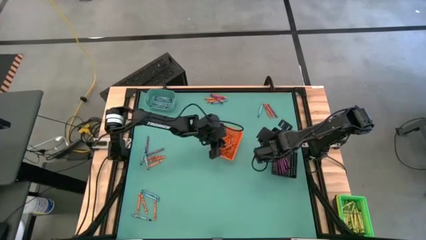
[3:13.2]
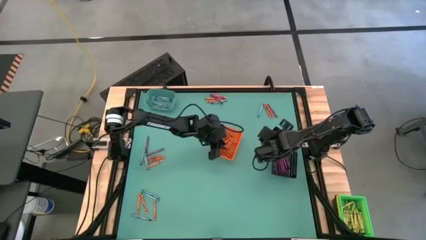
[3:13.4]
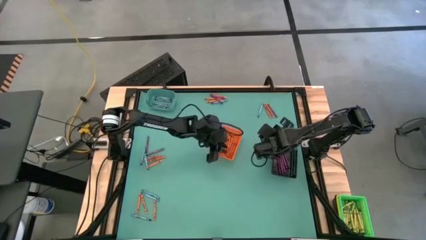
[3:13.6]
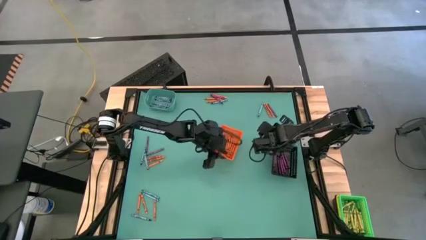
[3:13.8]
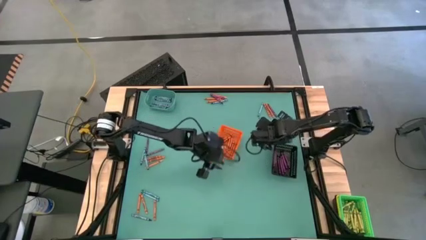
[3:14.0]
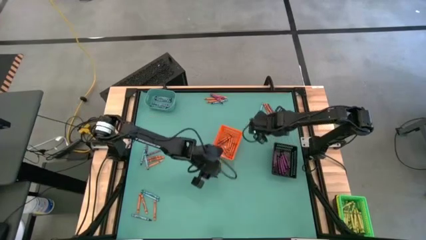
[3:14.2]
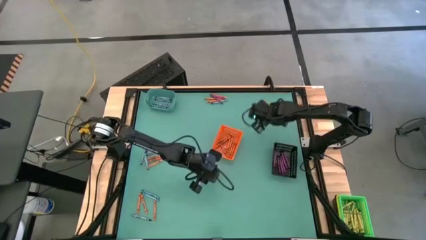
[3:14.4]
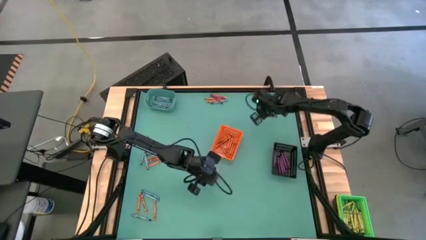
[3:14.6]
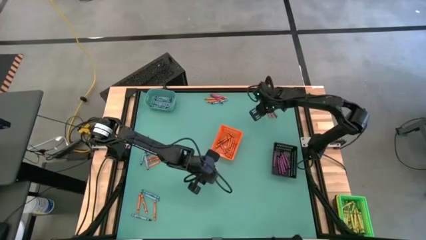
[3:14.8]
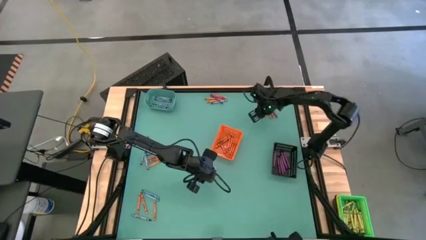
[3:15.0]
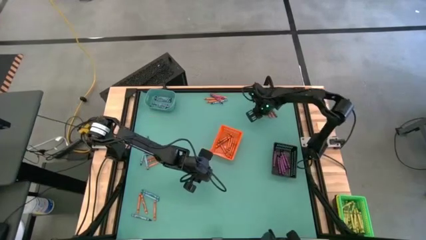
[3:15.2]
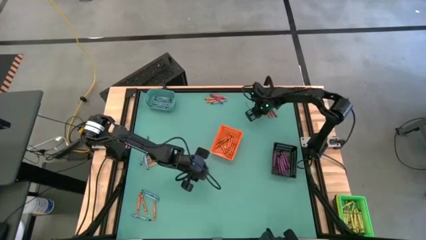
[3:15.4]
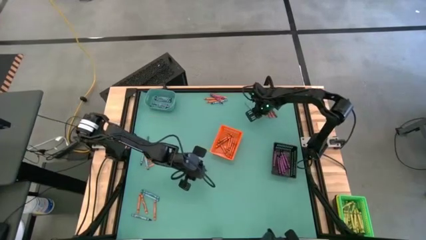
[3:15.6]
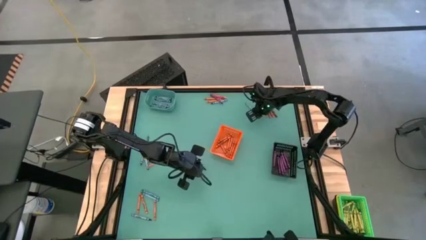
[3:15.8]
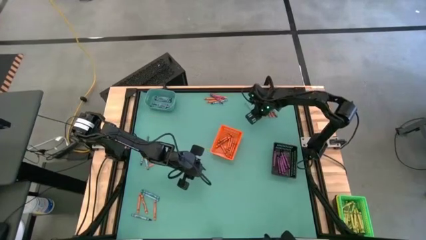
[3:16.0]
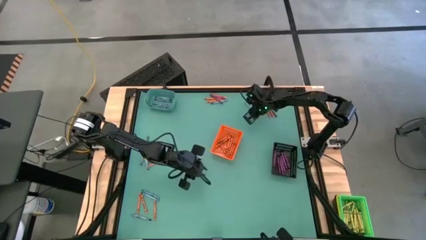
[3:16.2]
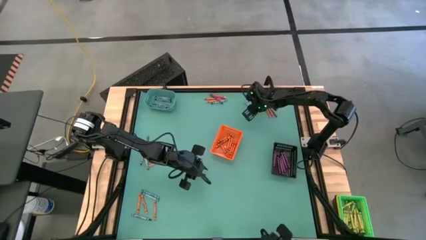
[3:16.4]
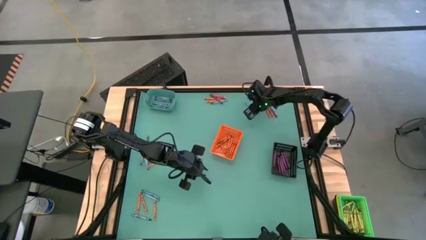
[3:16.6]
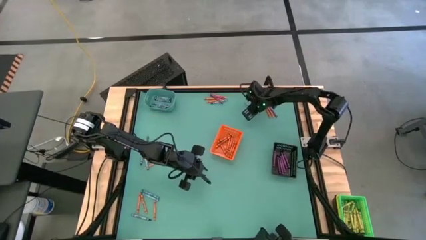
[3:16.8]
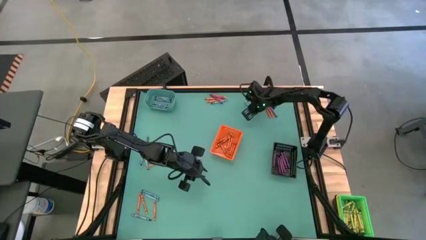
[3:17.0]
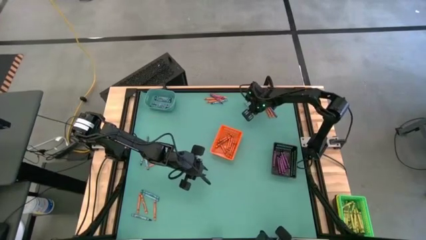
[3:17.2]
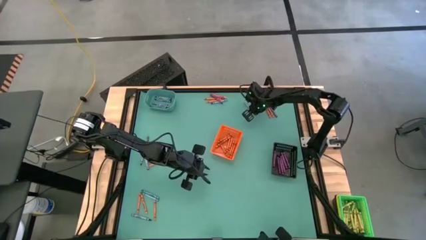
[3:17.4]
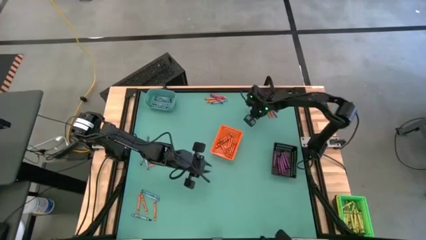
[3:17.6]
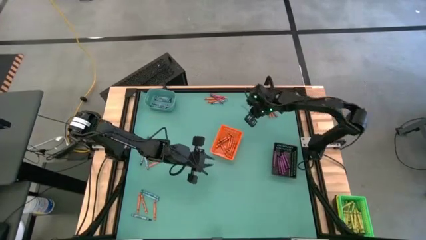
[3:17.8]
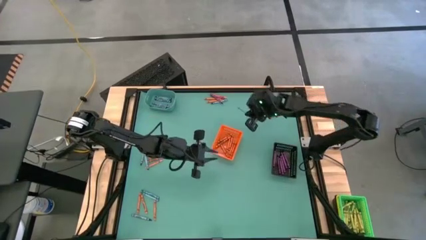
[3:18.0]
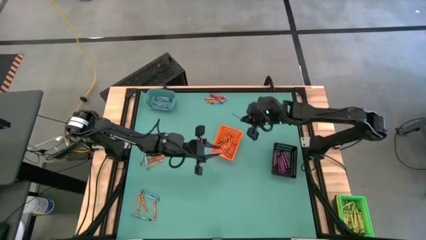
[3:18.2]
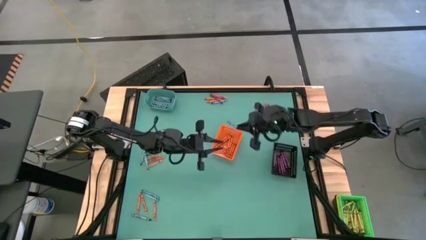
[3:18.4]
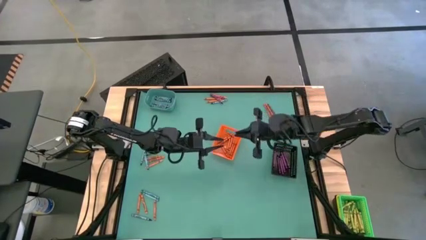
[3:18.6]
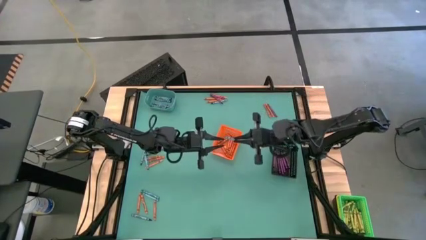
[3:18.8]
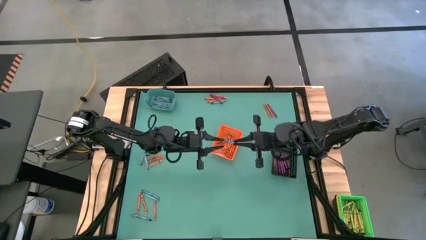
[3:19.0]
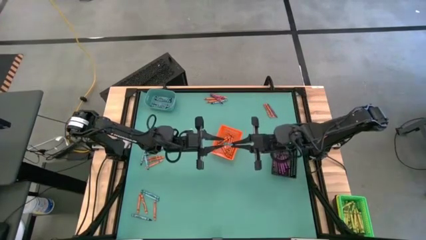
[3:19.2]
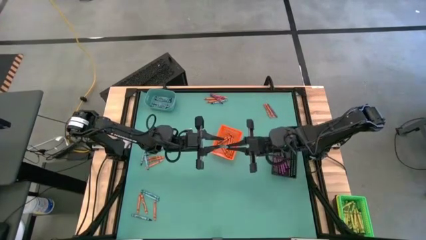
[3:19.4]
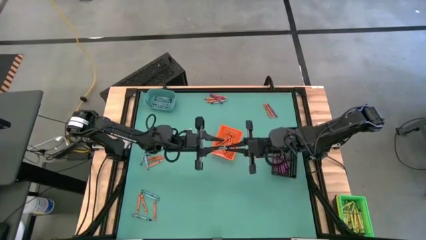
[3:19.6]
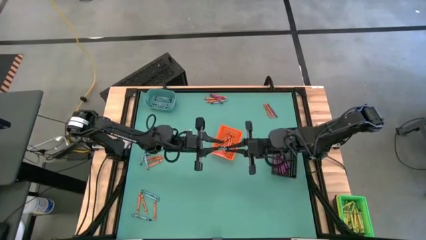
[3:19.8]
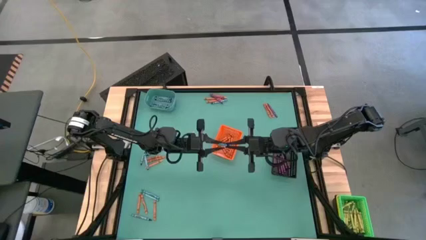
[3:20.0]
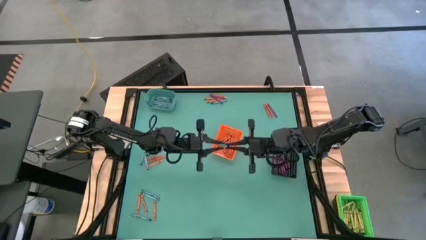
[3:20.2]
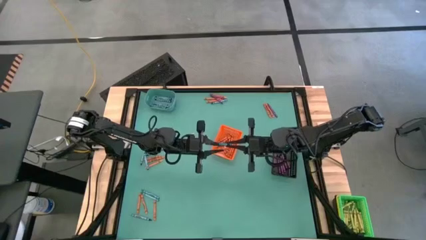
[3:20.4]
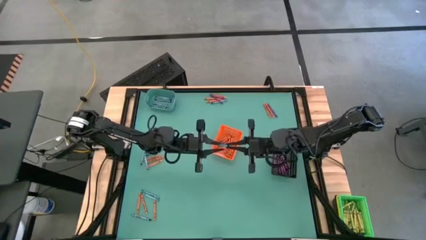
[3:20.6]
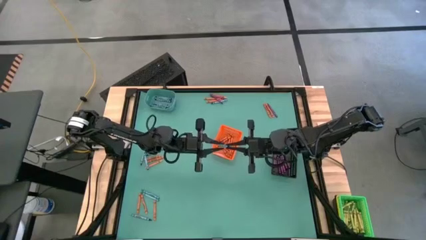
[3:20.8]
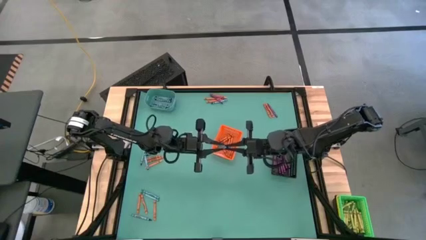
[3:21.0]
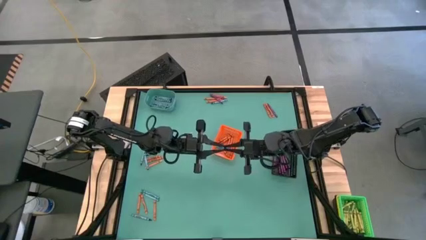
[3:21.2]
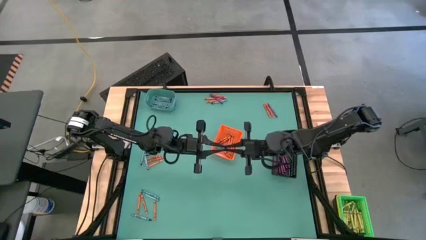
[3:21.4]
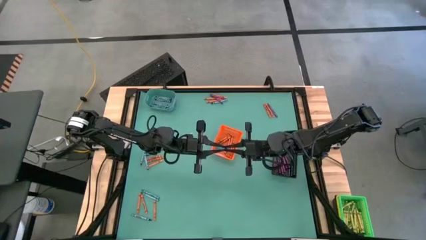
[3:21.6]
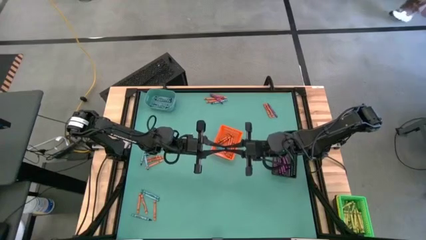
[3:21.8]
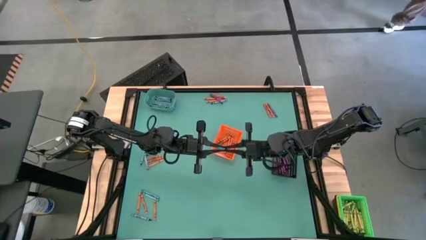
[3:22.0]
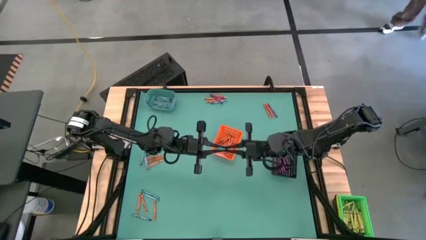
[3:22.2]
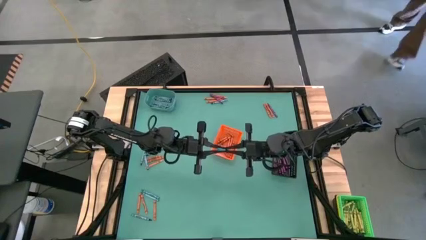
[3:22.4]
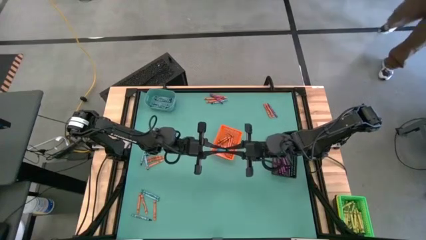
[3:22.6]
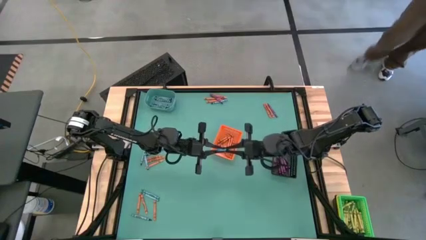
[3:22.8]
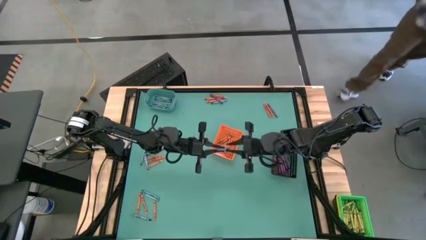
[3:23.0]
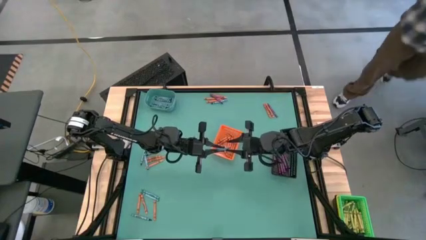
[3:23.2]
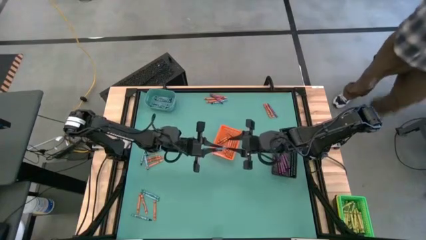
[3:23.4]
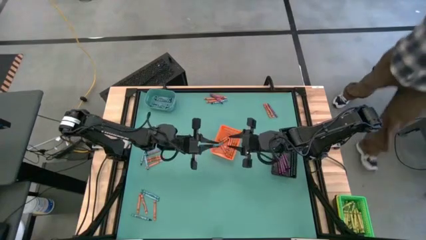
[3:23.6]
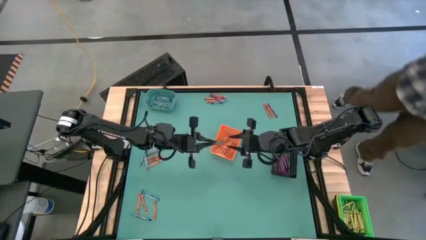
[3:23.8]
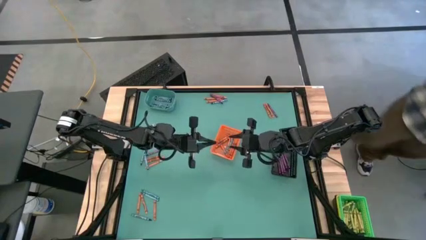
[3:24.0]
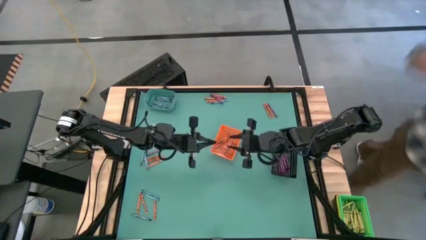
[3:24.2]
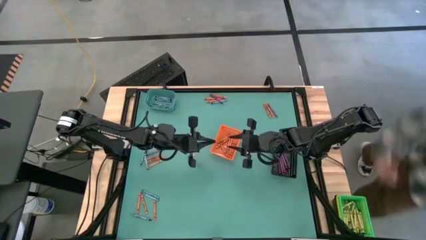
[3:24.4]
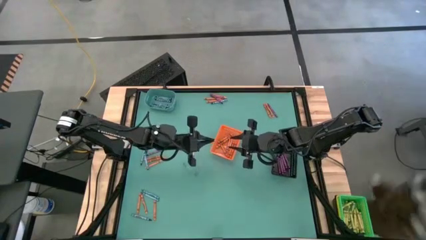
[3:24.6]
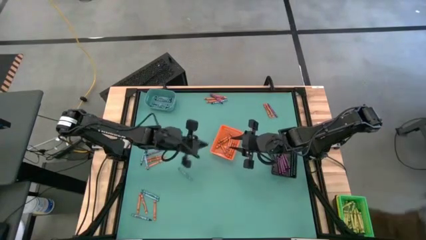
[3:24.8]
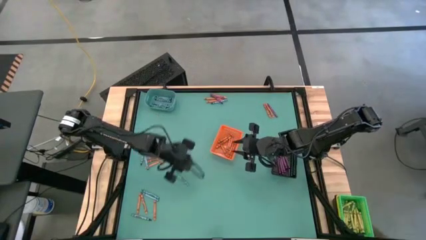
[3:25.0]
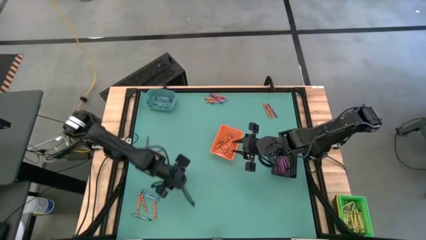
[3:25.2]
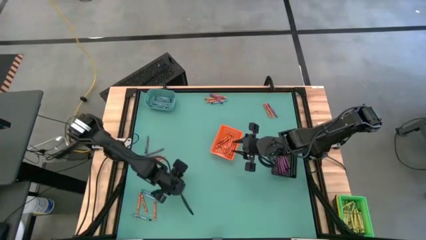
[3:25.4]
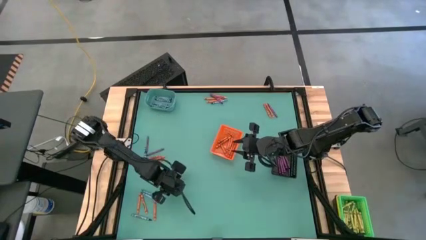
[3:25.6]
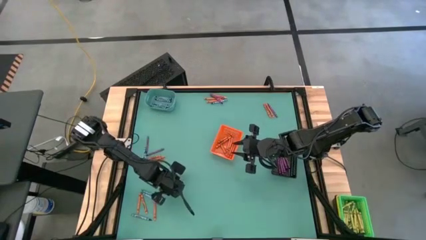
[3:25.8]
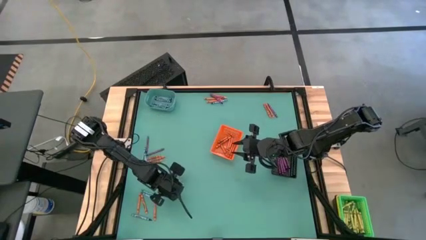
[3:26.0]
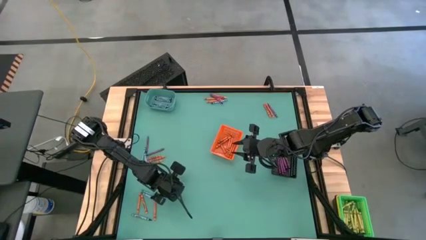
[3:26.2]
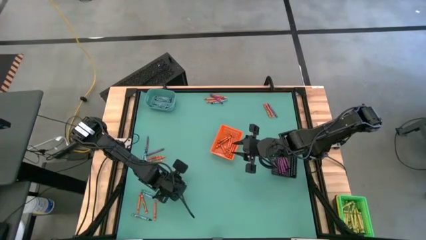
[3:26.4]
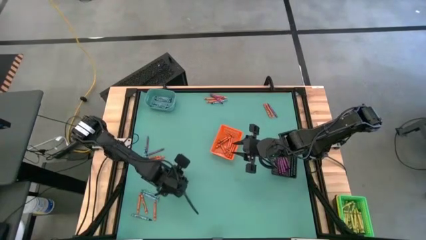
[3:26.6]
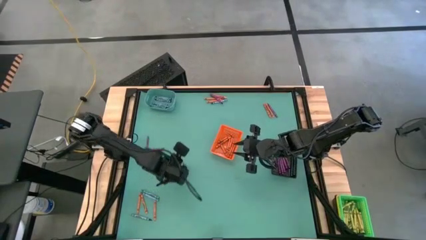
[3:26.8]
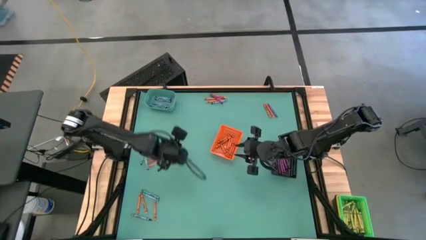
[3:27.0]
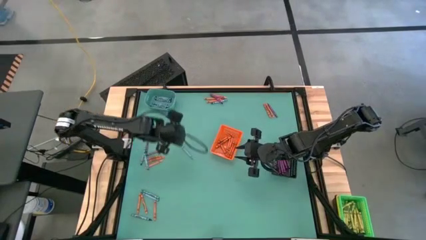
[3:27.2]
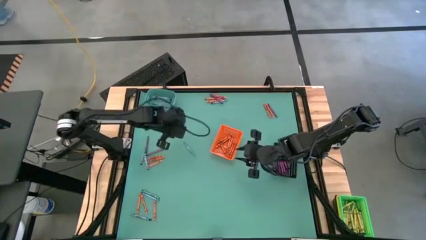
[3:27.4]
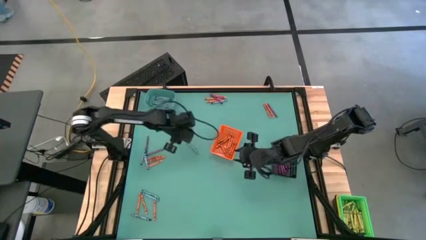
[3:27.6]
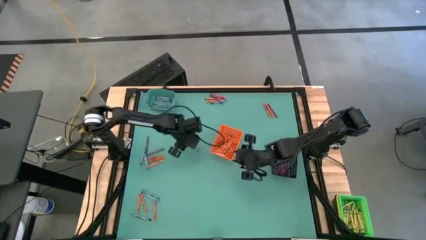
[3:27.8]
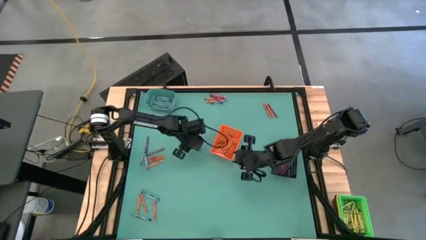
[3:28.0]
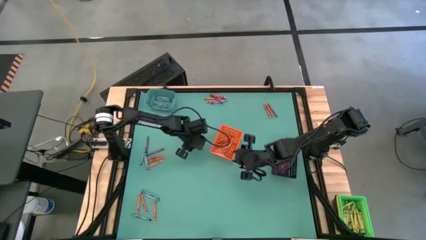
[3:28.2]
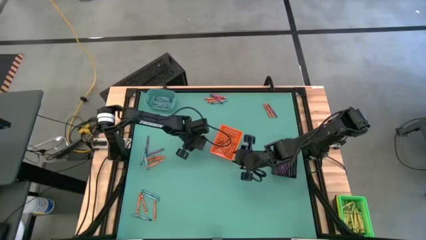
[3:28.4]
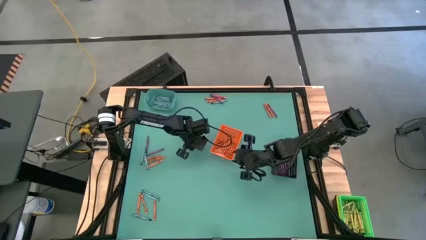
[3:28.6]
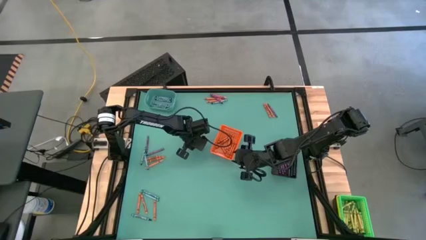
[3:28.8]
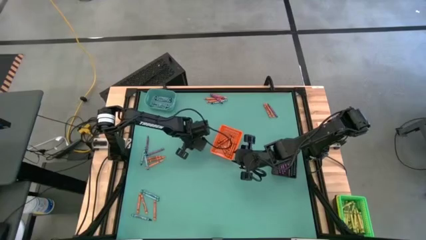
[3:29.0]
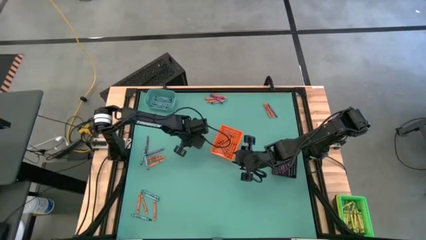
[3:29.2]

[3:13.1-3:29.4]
Task: Sort crayons
Put the blue crayon into the blue bin
